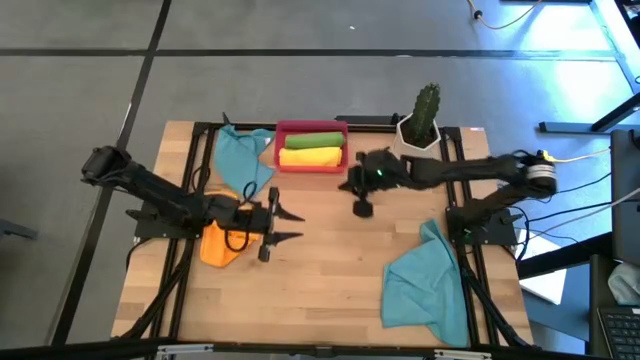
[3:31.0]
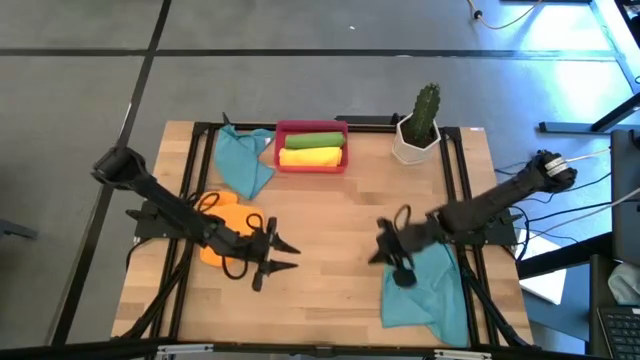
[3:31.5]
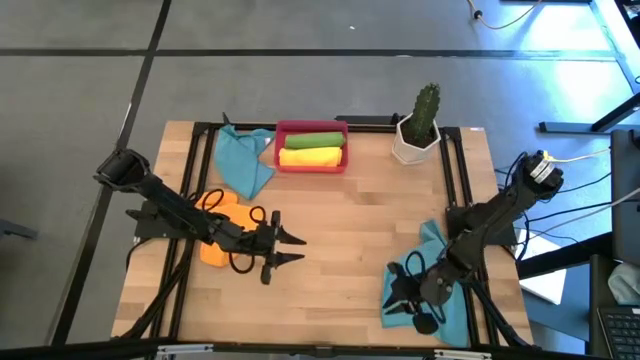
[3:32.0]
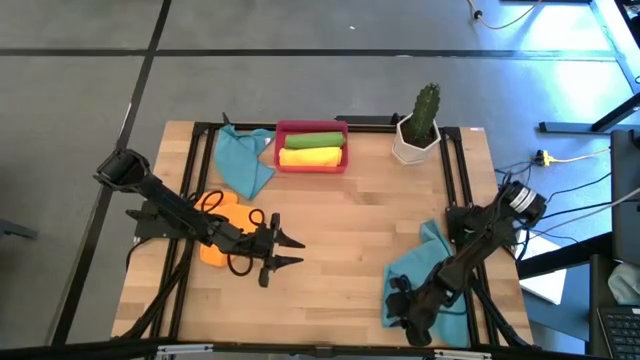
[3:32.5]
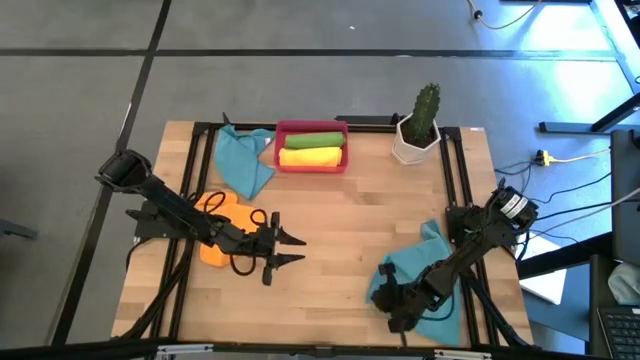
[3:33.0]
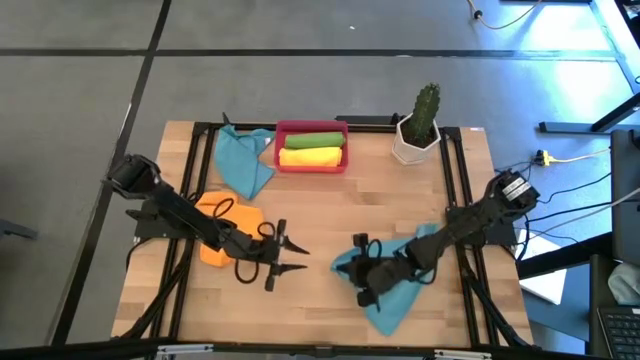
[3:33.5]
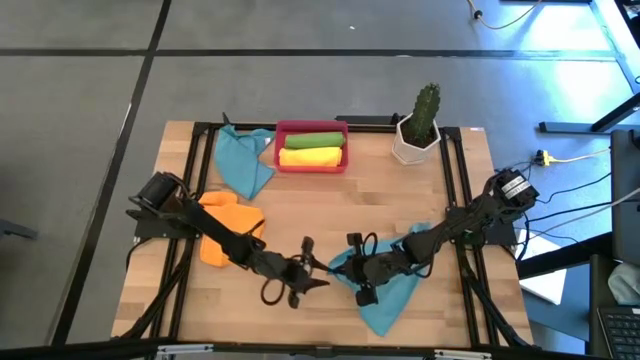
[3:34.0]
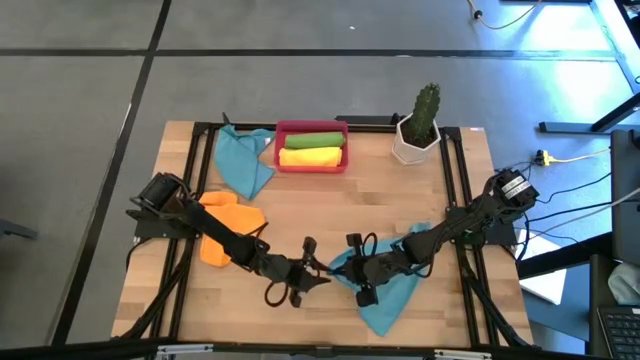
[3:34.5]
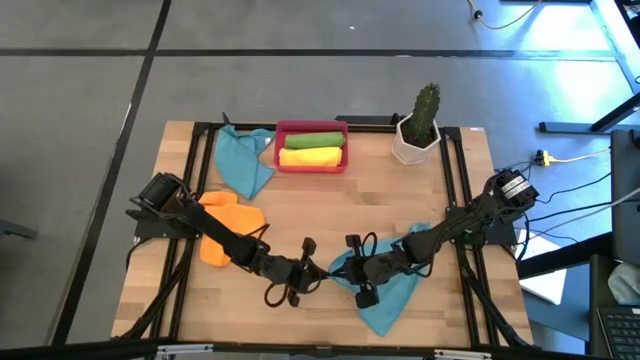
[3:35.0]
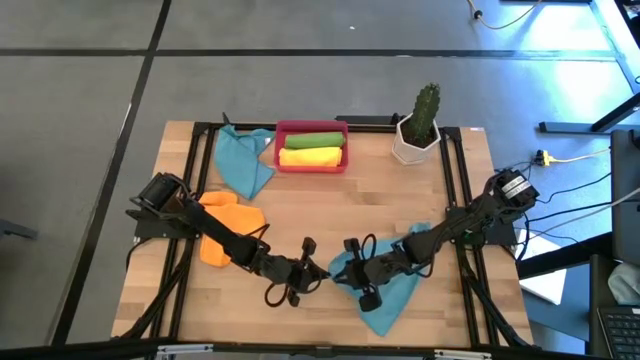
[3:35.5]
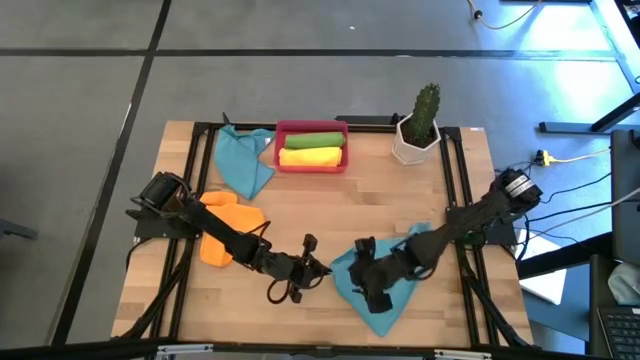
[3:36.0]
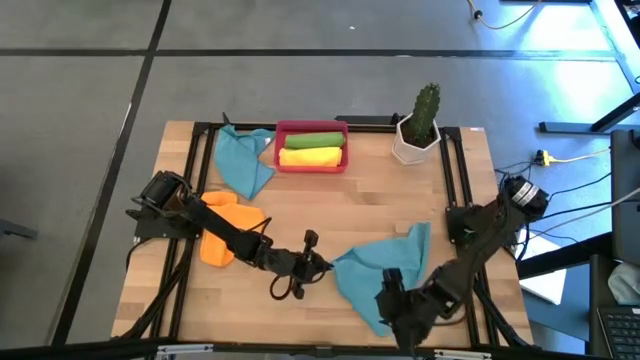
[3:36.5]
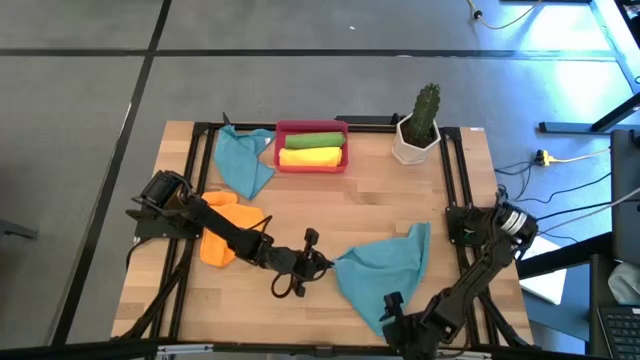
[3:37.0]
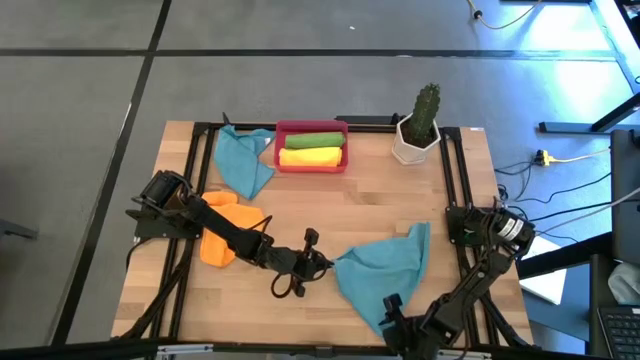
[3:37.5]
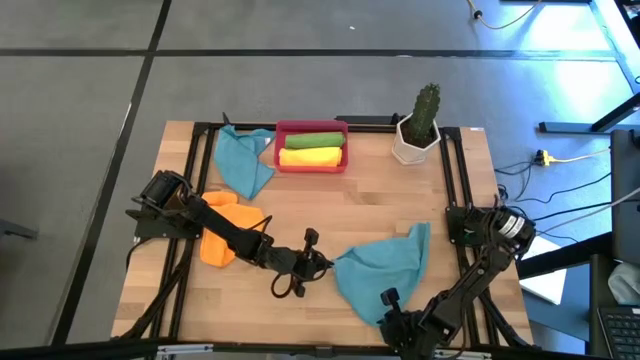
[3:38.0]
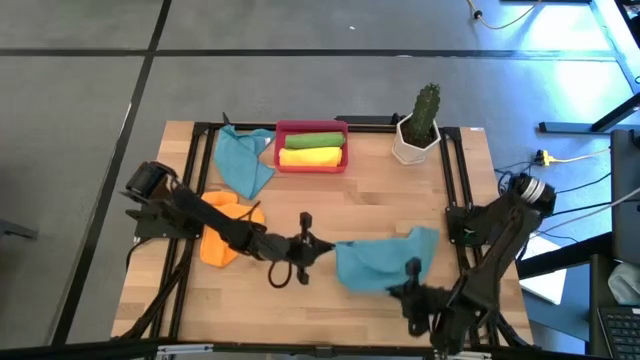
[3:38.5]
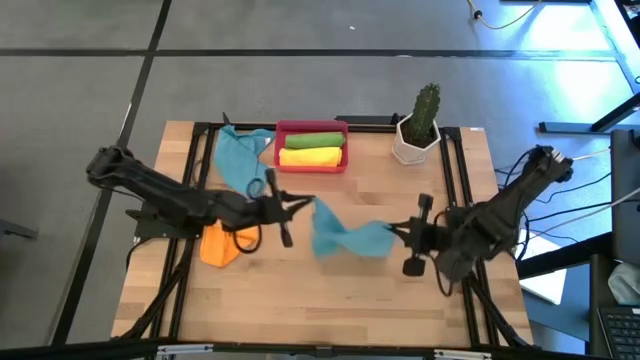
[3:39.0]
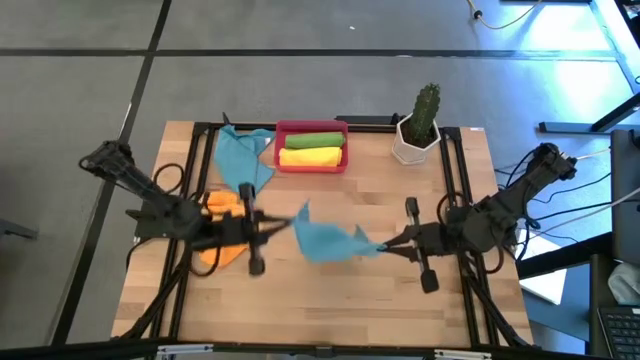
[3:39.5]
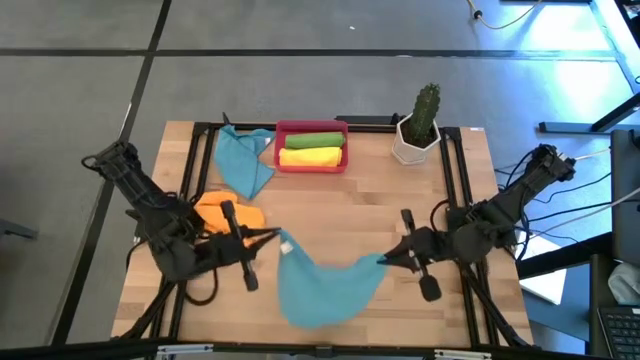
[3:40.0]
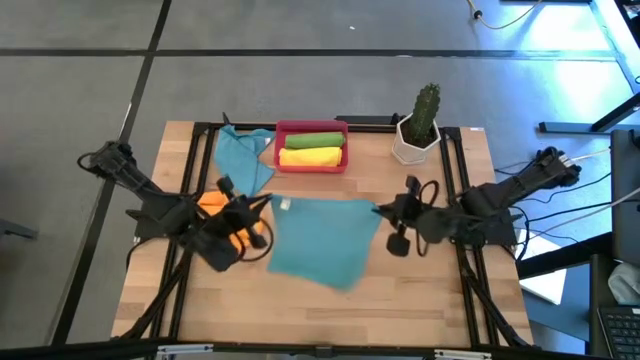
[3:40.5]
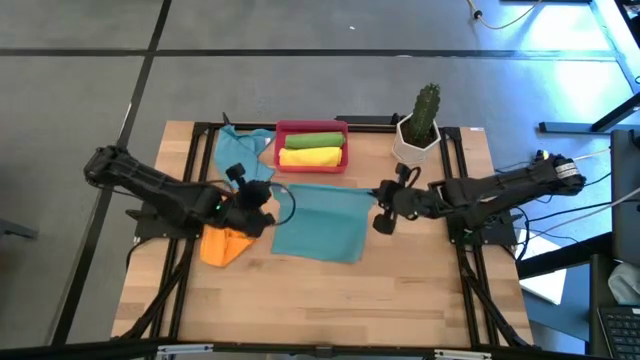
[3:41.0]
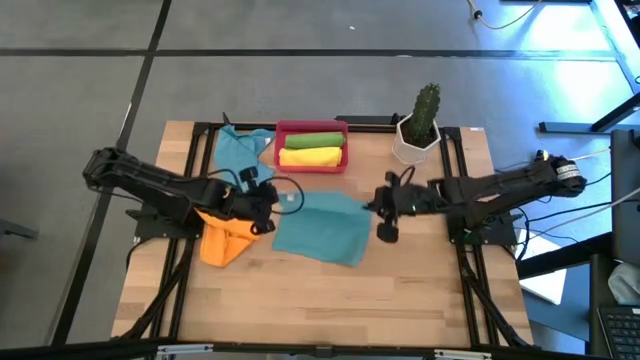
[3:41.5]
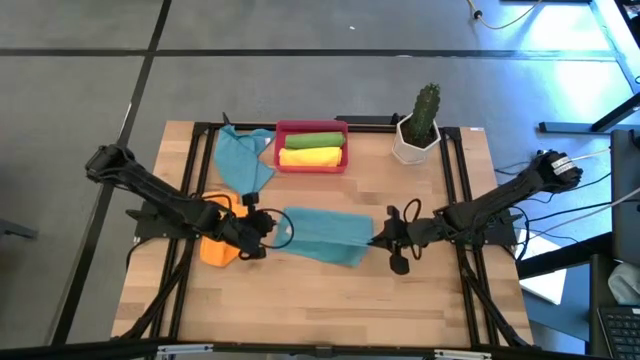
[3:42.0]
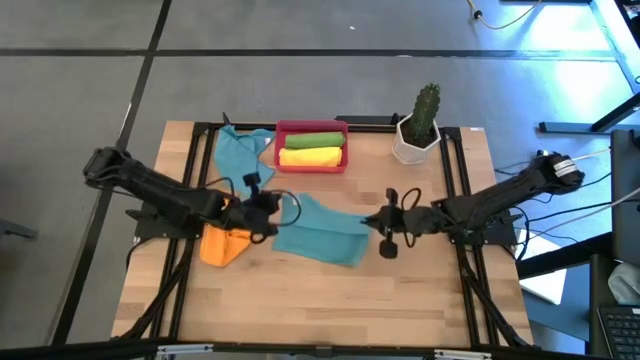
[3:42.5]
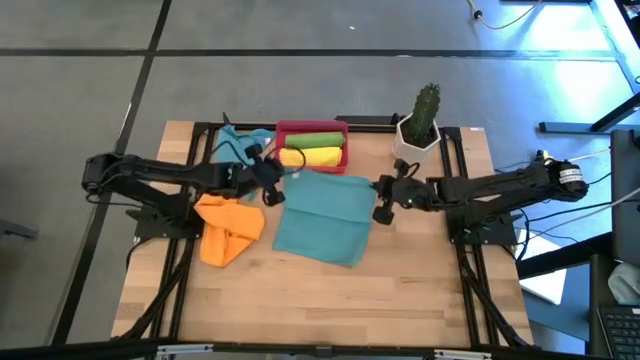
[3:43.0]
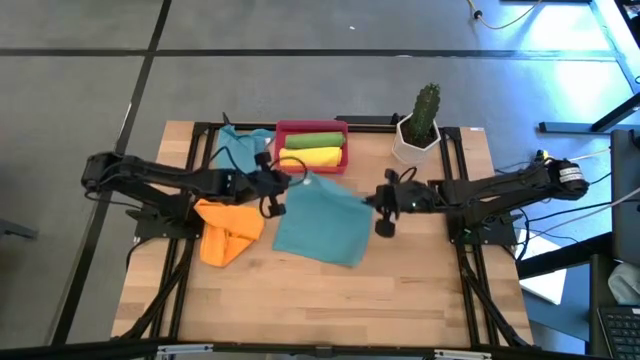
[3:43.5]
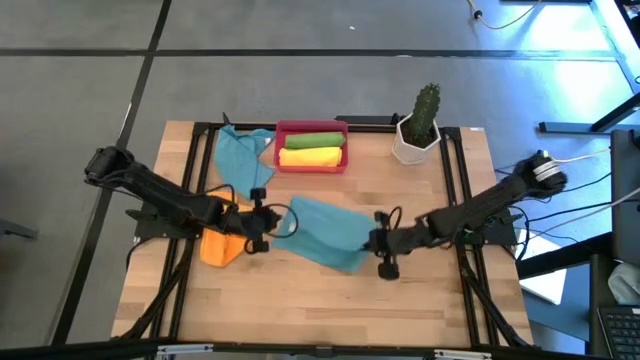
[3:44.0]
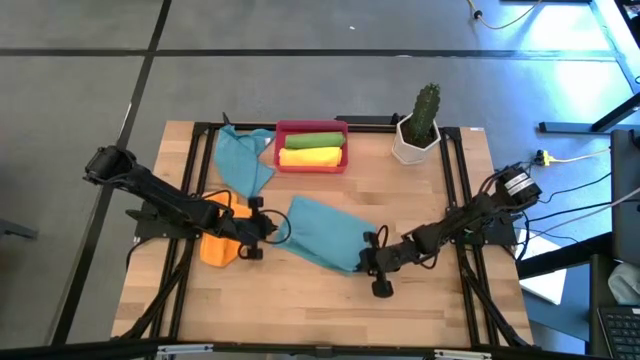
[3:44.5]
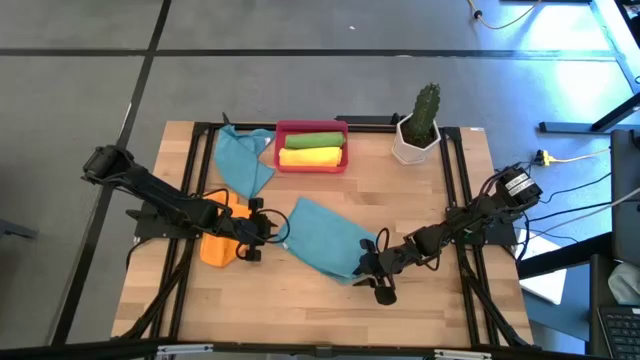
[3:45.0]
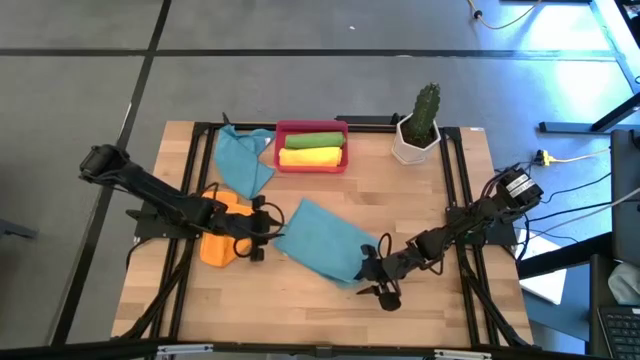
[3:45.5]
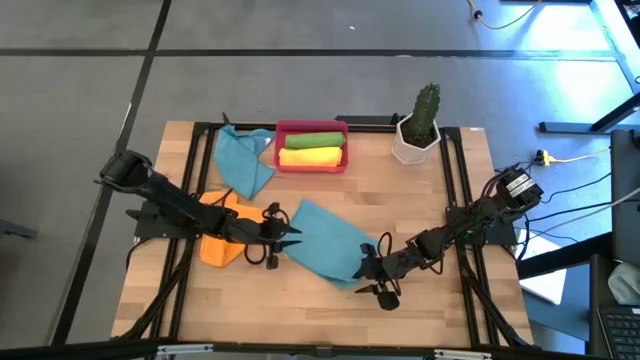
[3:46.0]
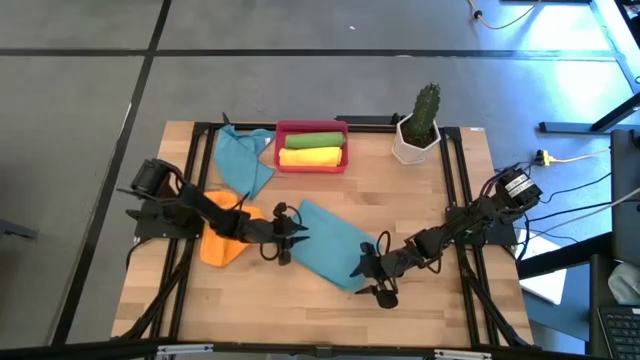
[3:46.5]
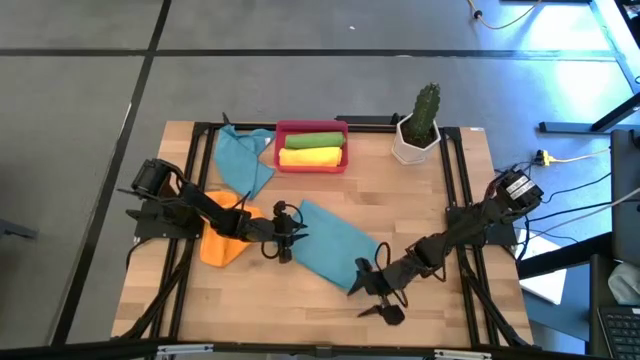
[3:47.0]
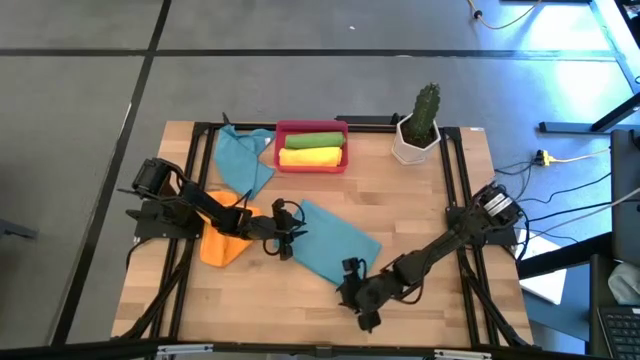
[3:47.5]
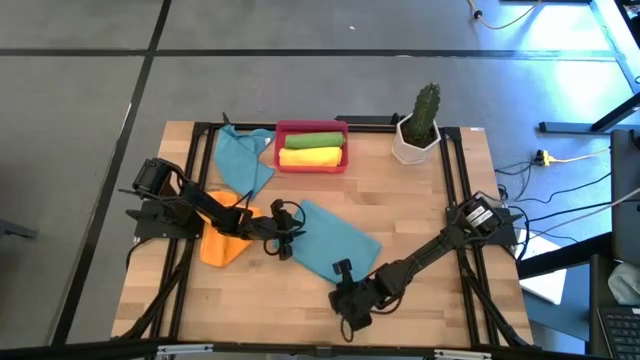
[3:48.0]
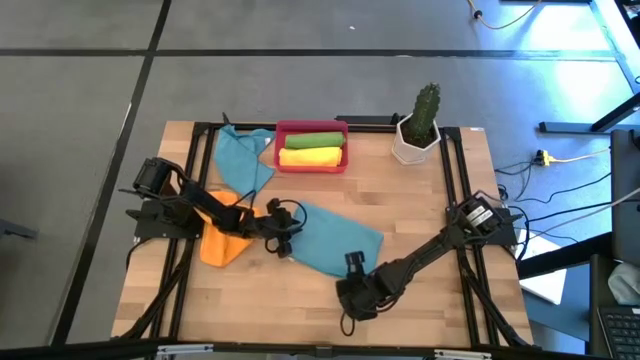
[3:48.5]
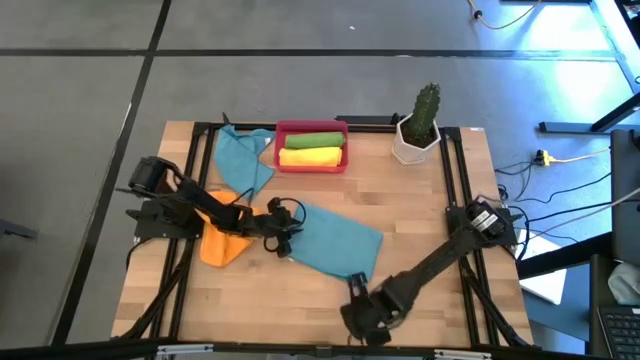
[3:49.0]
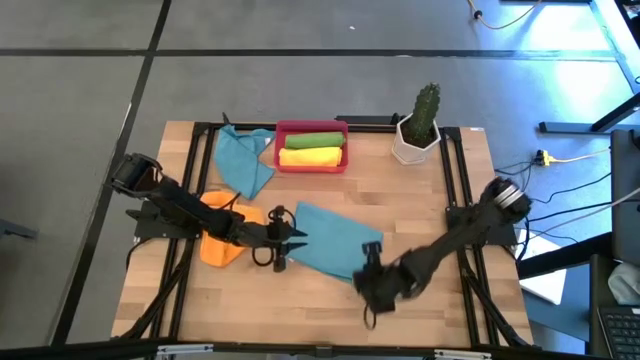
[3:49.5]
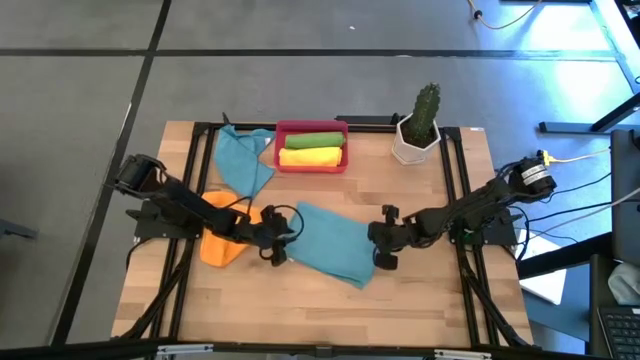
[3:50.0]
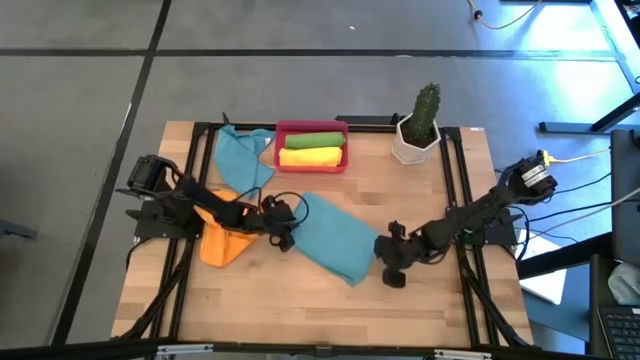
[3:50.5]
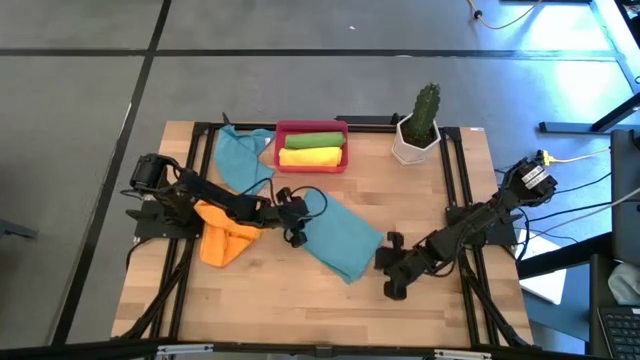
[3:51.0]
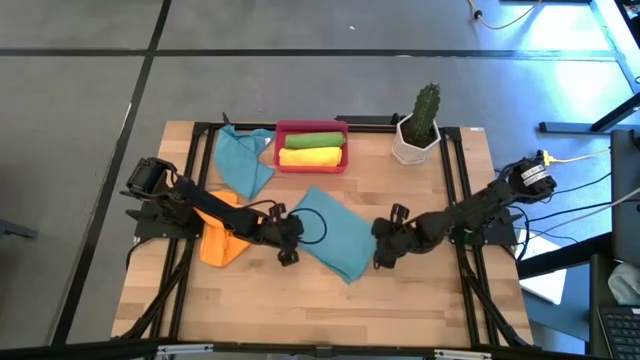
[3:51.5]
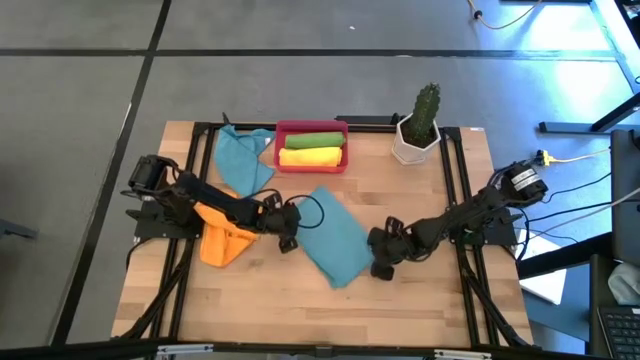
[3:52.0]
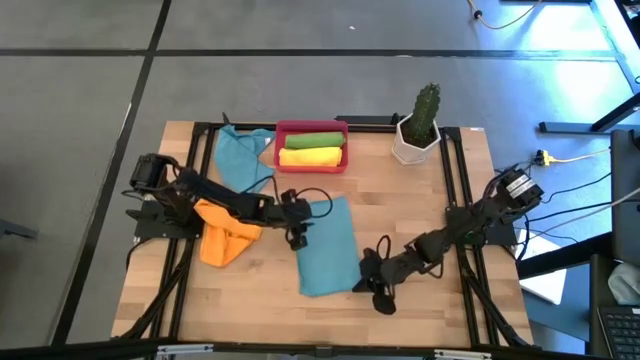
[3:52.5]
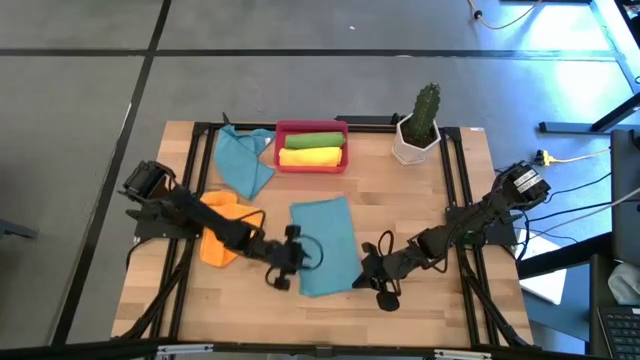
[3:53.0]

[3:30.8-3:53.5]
Task: Roll microfiber towels into tight, uniform cylinder then place into a basket
Roll the bottom blue towel
